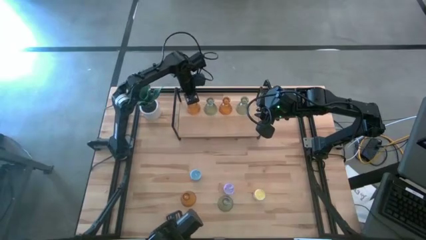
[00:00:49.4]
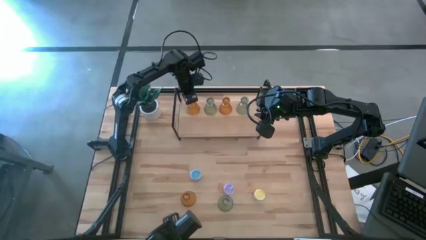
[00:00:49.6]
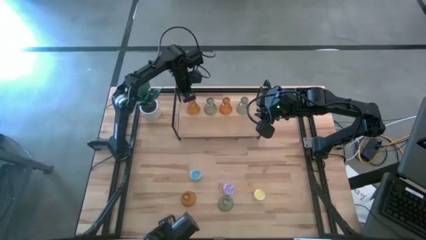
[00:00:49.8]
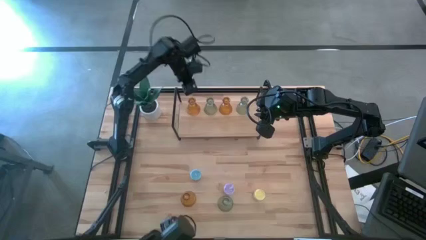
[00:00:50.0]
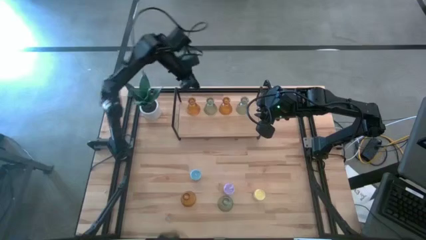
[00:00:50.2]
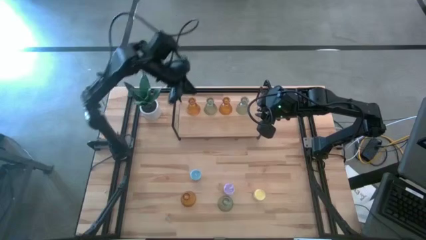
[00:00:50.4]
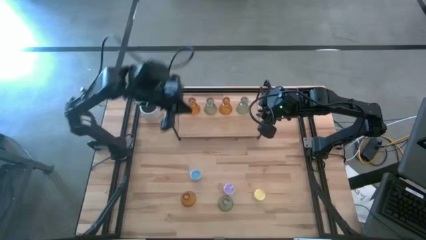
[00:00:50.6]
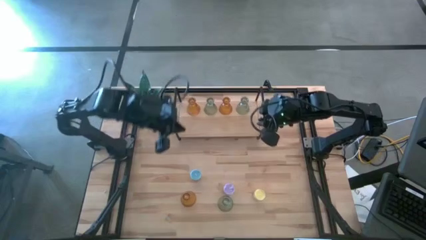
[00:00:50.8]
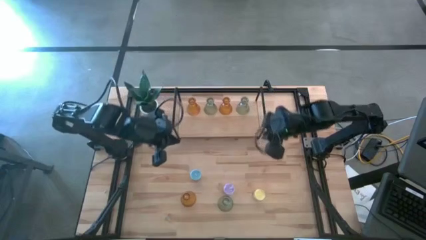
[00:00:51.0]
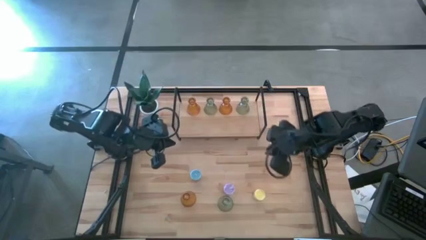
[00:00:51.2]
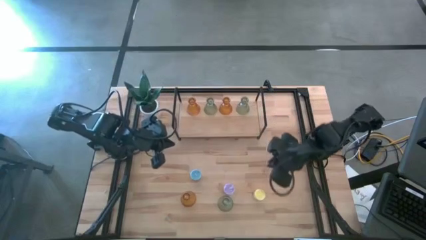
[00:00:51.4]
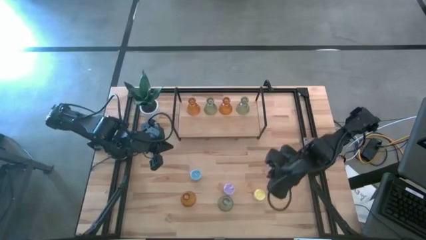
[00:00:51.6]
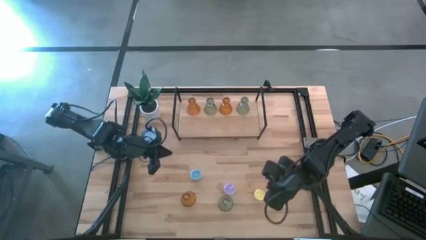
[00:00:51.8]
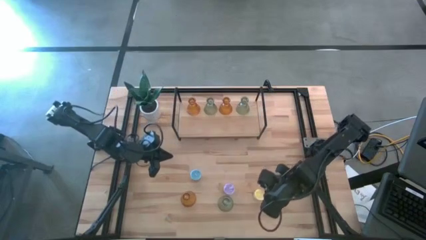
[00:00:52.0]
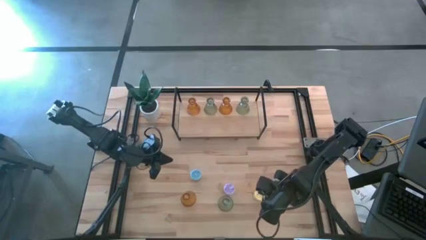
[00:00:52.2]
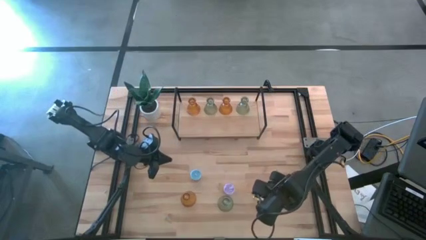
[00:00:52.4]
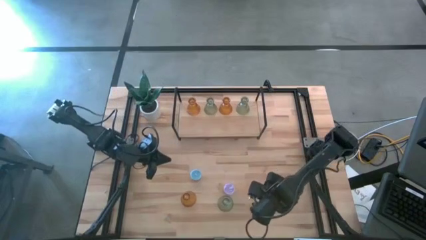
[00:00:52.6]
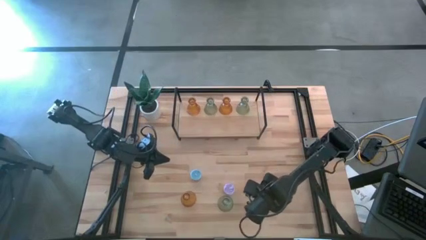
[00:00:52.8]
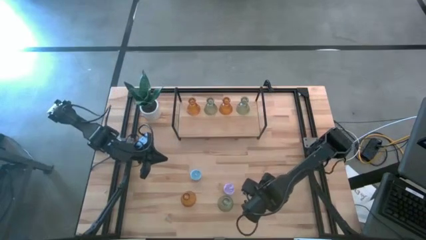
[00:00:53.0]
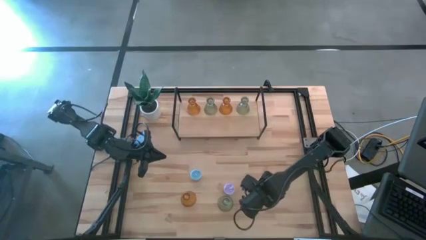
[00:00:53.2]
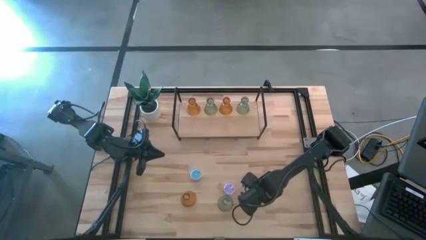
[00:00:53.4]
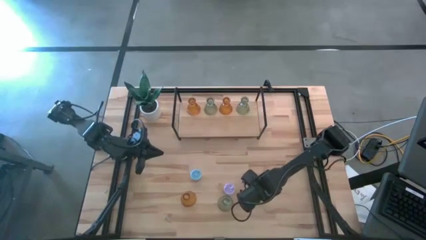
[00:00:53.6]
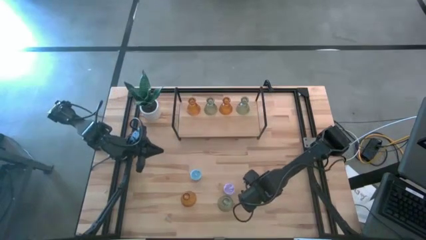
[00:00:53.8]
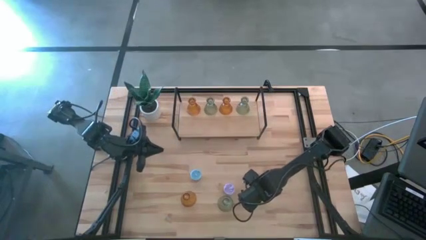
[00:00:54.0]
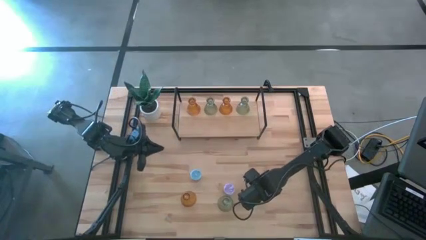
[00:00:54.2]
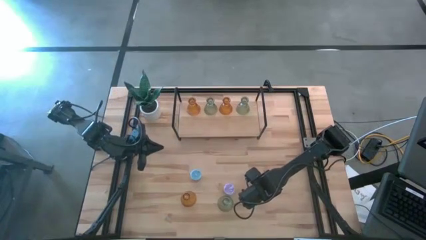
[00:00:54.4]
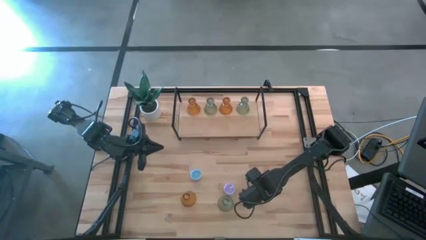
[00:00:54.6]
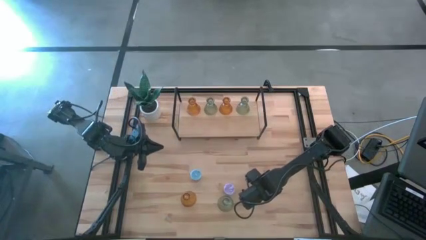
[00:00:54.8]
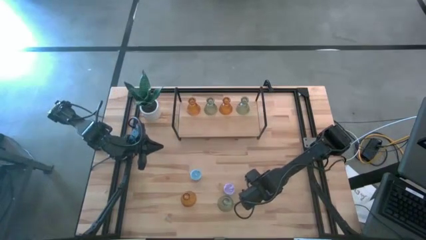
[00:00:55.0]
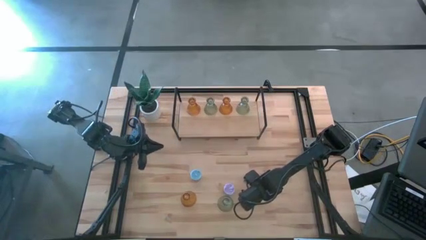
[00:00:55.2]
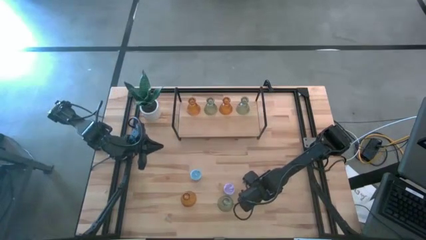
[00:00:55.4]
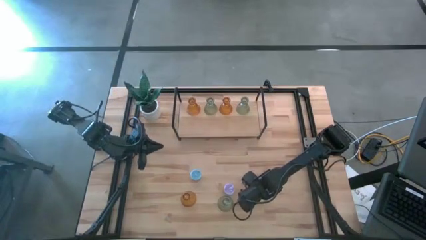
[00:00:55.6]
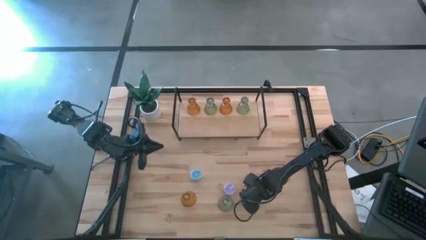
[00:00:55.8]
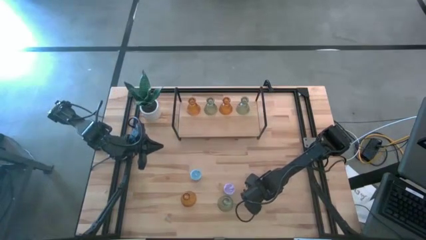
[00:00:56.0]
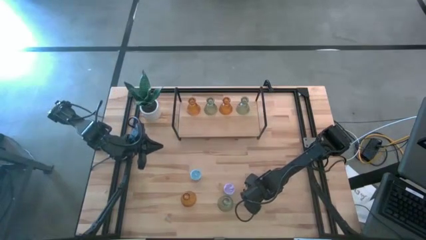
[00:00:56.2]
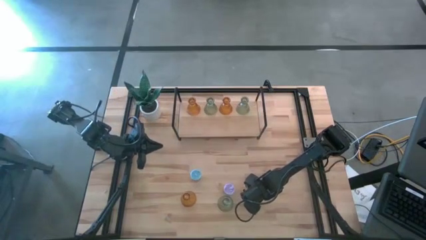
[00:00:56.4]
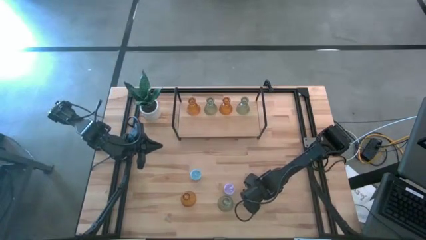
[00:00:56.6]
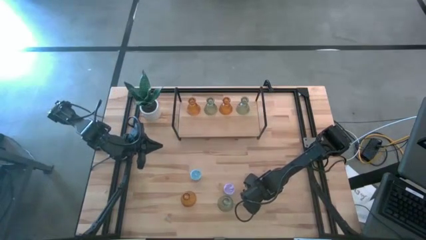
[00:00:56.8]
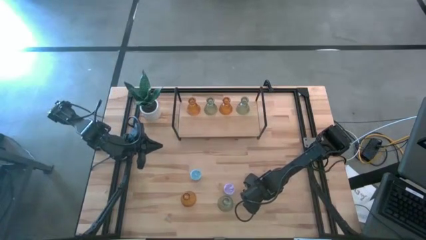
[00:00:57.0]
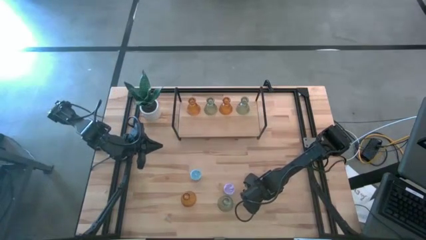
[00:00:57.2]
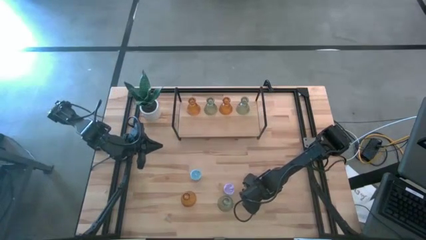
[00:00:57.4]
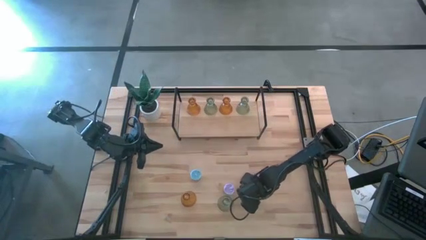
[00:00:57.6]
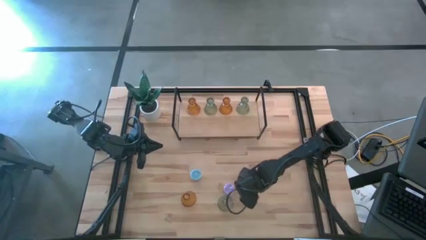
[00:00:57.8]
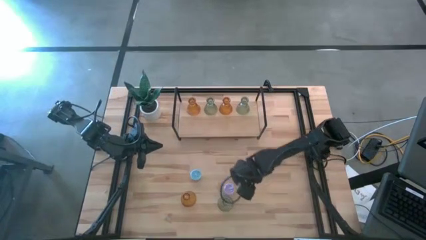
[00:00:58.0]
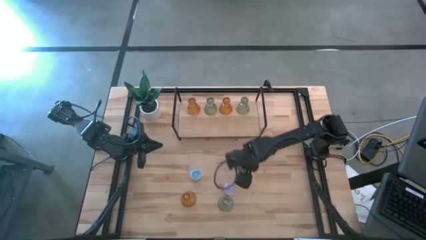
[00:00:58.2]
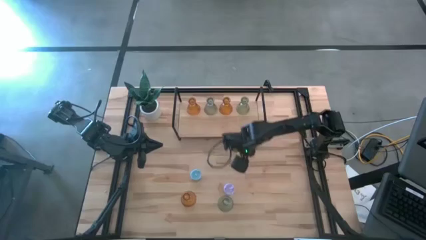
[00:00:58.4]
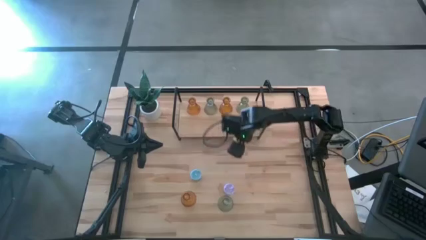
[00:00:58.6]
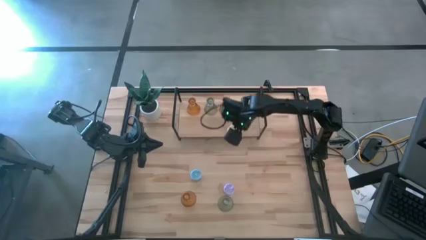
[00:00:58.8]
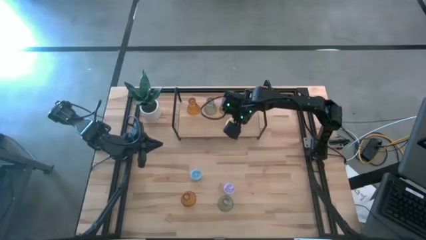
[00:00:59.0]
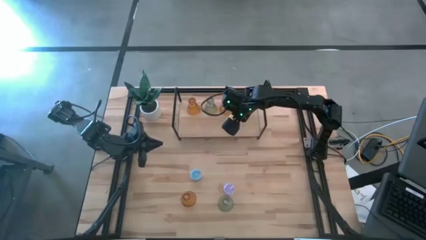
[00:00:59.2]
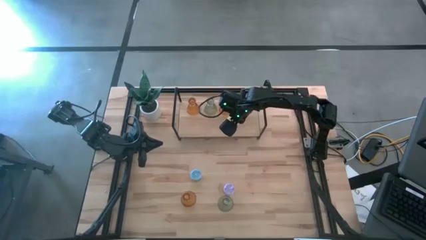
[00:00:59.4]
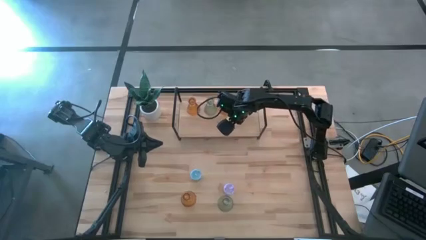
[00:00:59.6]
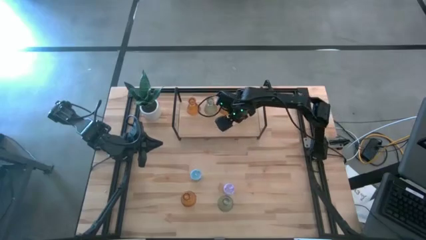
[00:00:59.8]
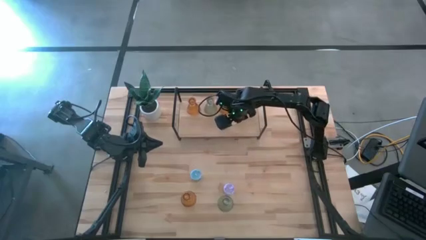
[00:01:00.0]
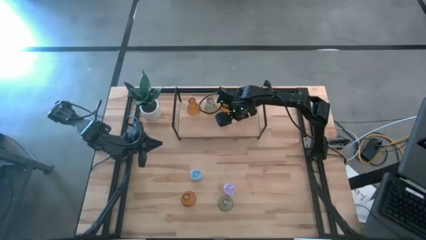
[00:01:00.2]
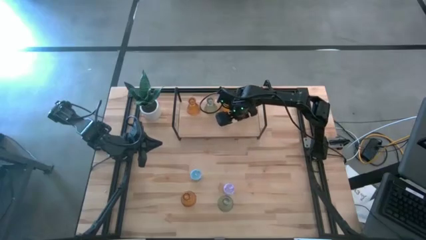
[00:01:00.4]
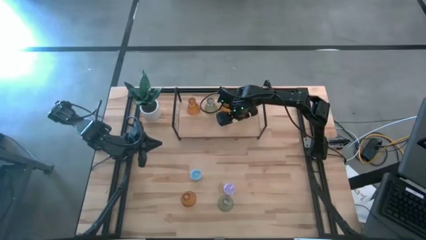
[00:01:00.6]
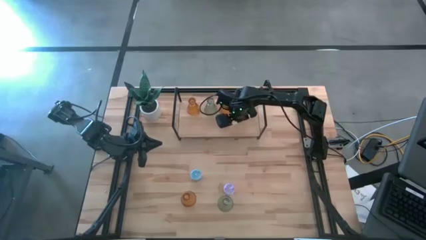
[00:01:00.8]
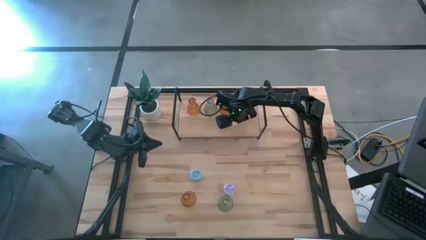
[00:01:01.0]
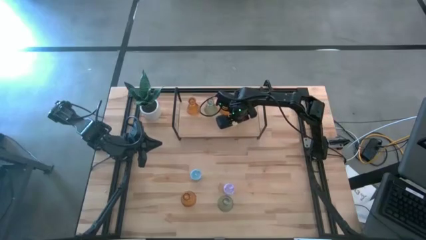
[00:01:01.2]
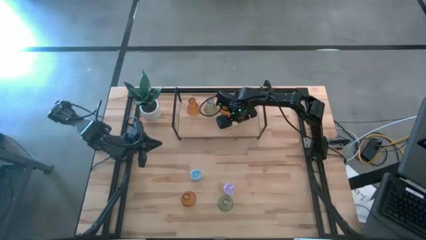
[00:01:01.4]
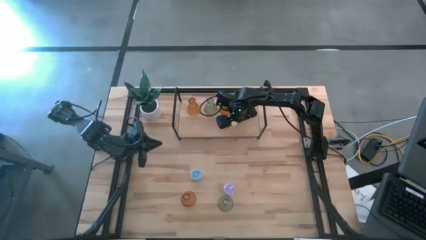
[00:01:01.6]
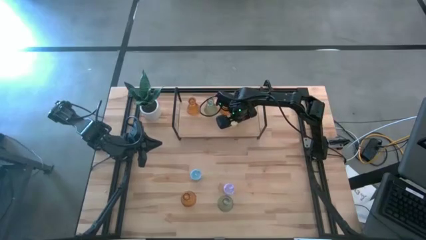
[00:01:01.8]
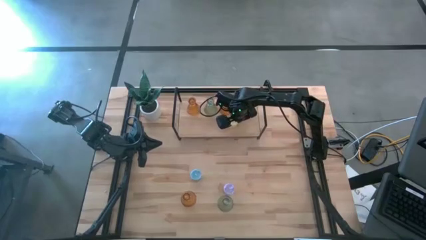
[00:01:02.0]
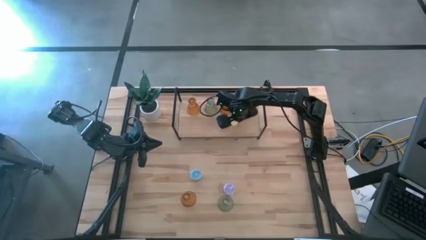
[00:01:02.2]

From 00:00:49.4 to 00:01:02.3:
Task: Pick & Place candle stick holders
Put the yellow candle on the shelf
